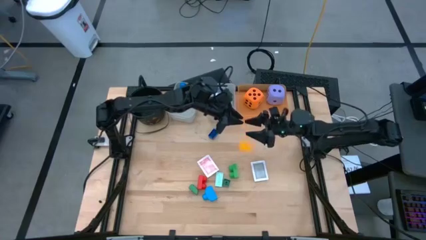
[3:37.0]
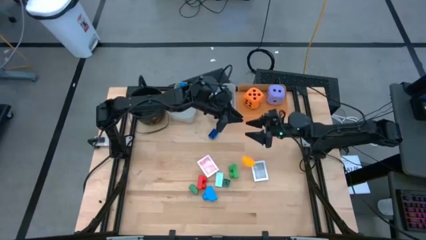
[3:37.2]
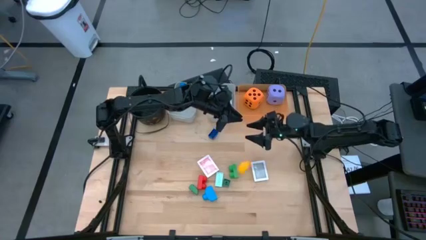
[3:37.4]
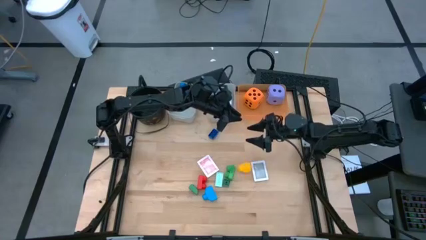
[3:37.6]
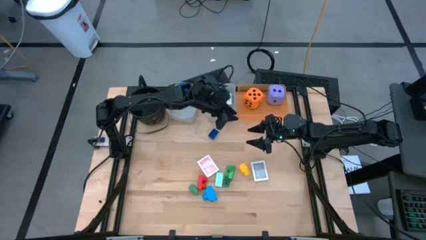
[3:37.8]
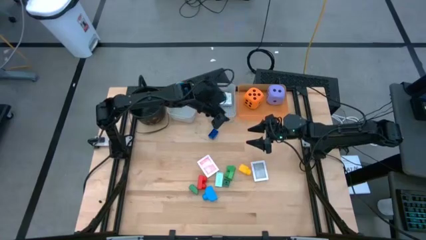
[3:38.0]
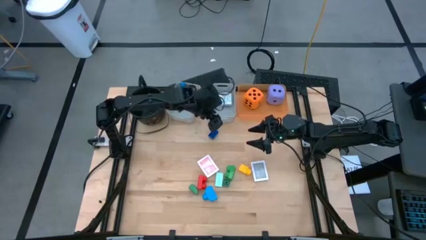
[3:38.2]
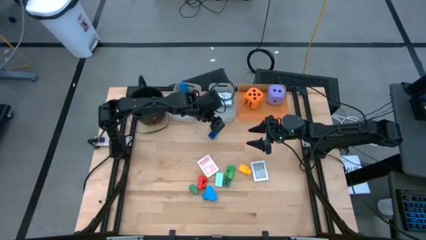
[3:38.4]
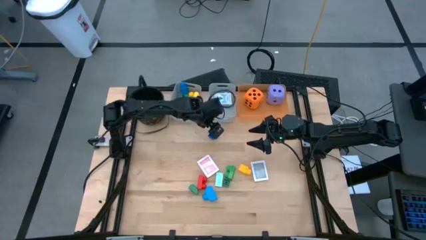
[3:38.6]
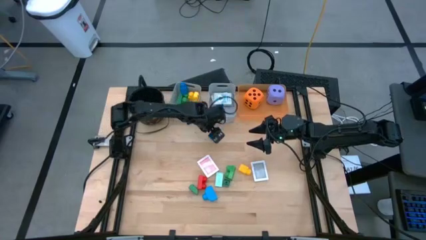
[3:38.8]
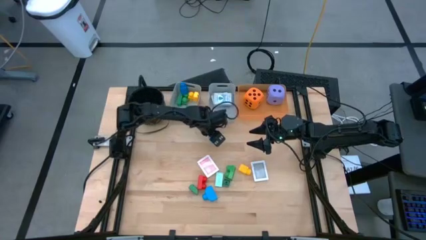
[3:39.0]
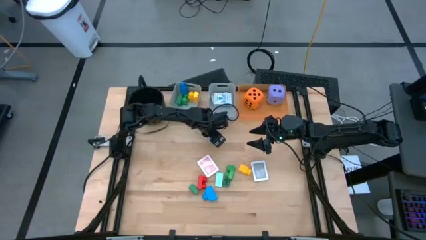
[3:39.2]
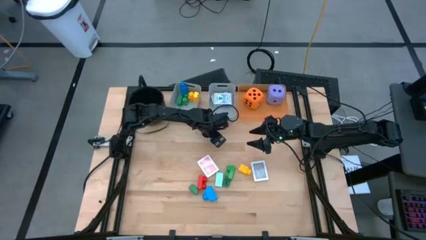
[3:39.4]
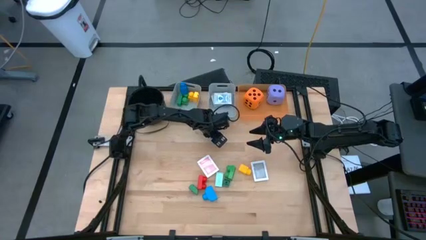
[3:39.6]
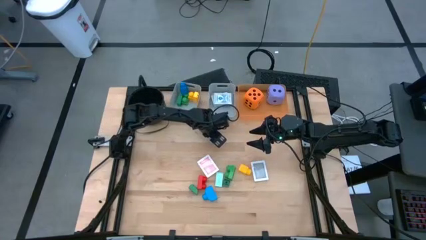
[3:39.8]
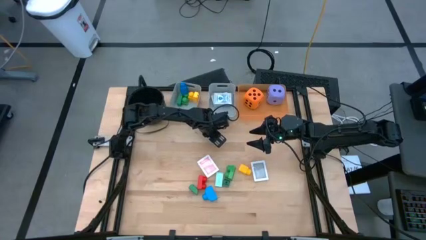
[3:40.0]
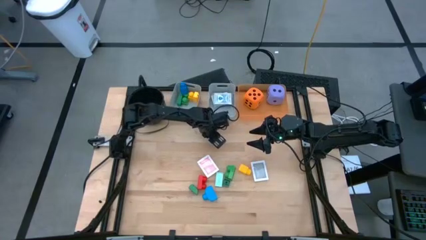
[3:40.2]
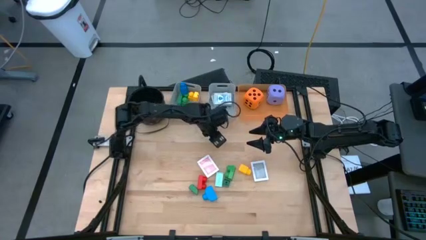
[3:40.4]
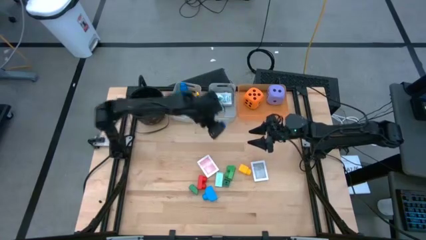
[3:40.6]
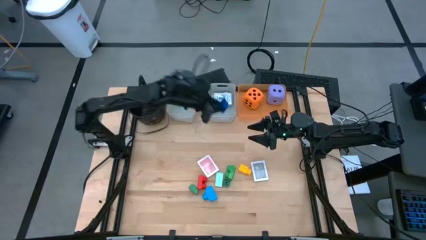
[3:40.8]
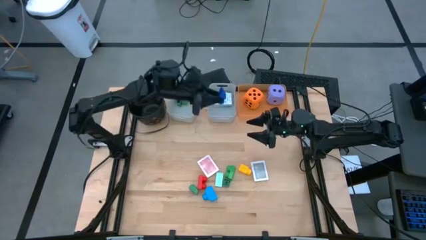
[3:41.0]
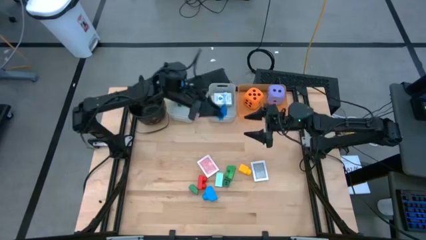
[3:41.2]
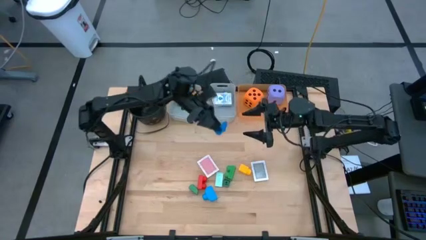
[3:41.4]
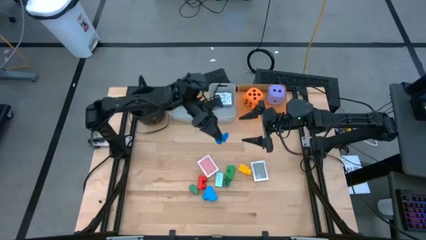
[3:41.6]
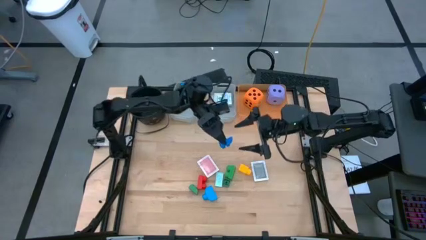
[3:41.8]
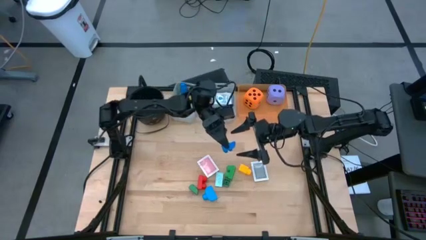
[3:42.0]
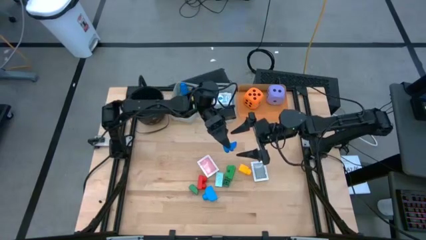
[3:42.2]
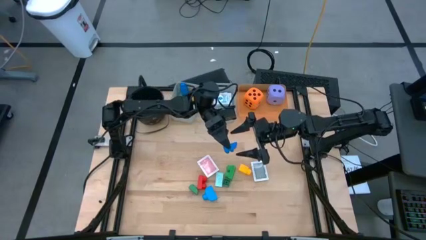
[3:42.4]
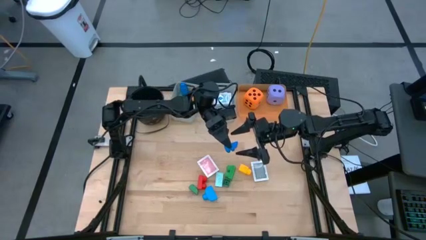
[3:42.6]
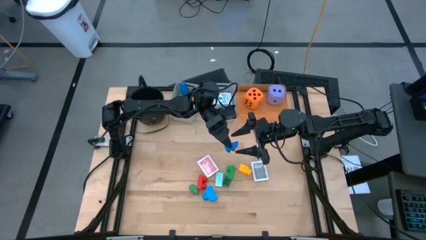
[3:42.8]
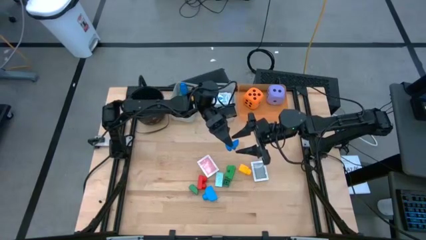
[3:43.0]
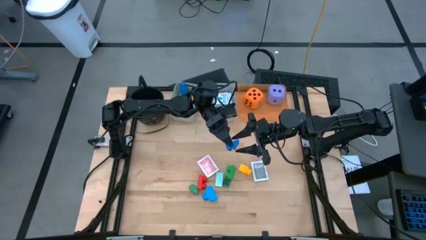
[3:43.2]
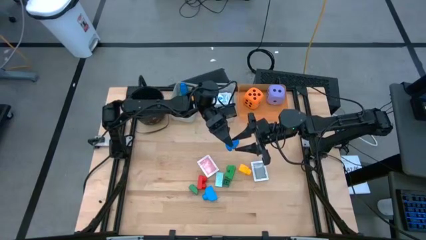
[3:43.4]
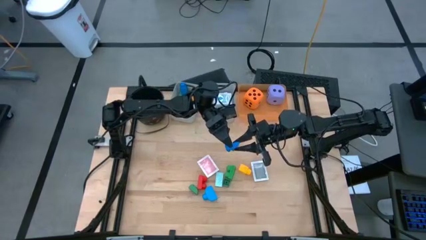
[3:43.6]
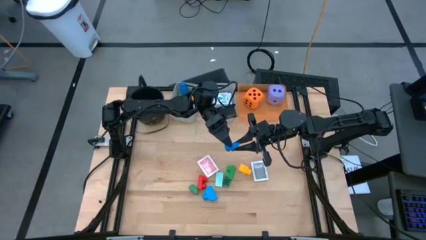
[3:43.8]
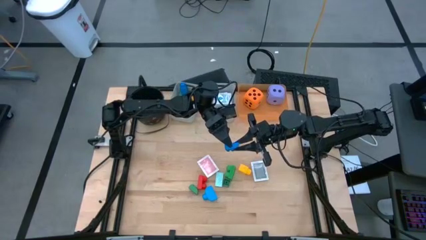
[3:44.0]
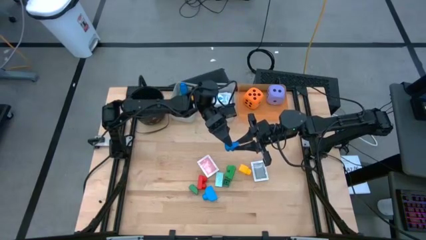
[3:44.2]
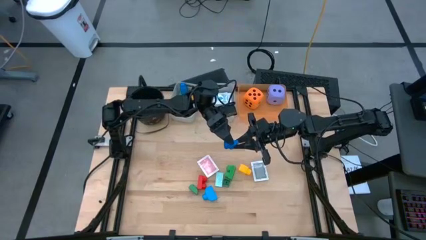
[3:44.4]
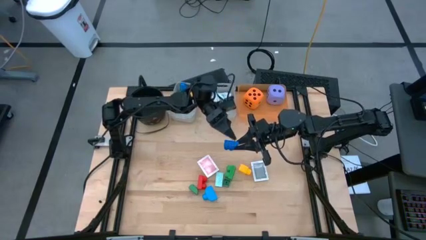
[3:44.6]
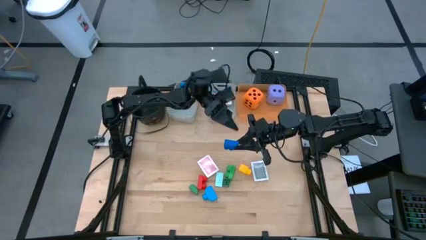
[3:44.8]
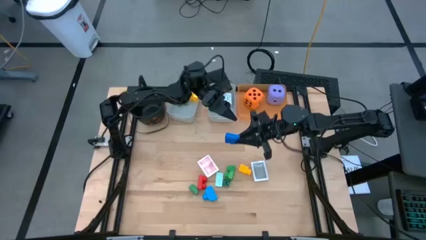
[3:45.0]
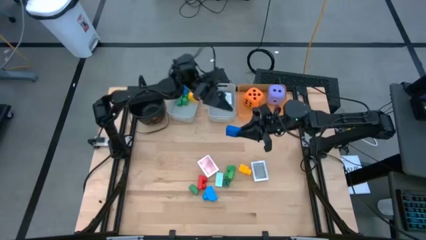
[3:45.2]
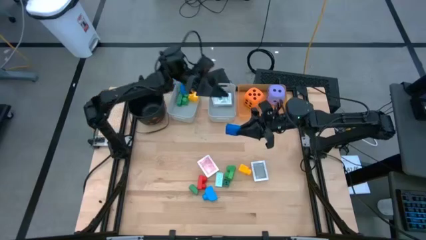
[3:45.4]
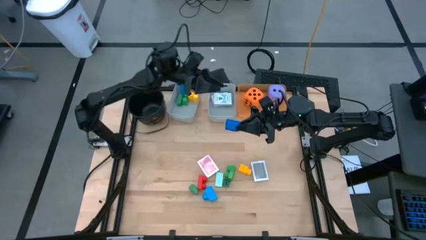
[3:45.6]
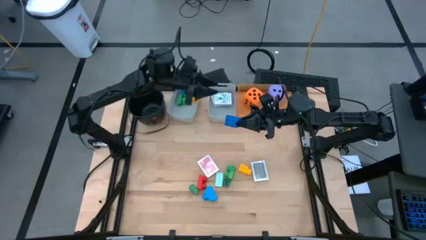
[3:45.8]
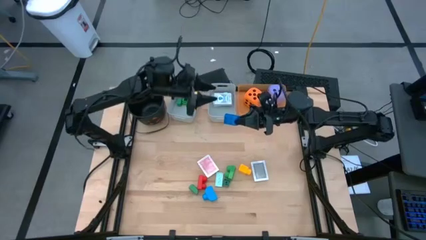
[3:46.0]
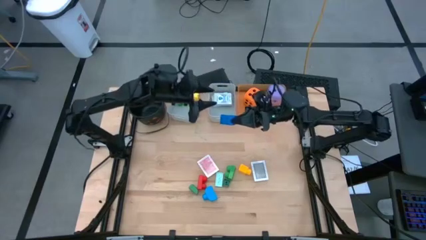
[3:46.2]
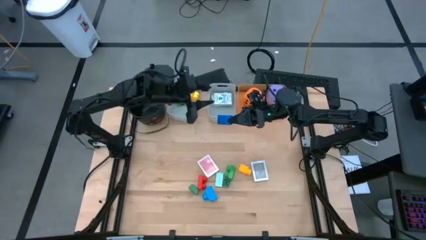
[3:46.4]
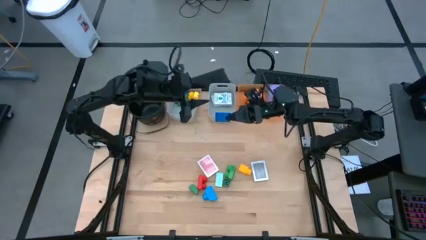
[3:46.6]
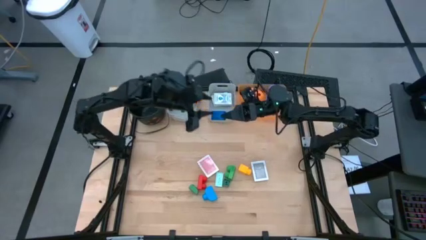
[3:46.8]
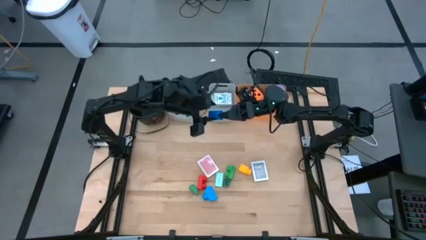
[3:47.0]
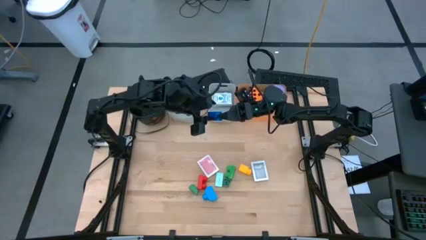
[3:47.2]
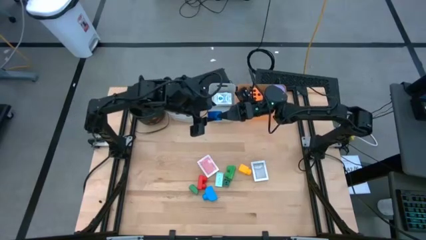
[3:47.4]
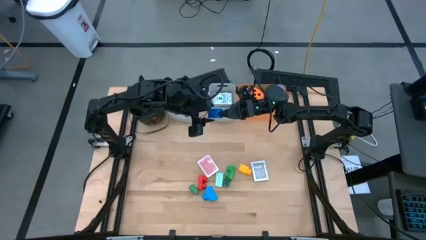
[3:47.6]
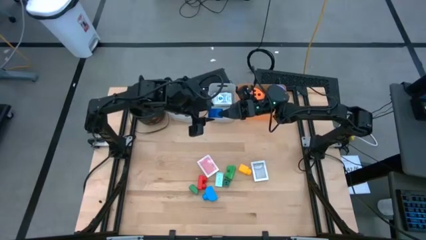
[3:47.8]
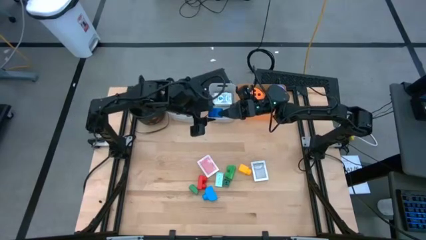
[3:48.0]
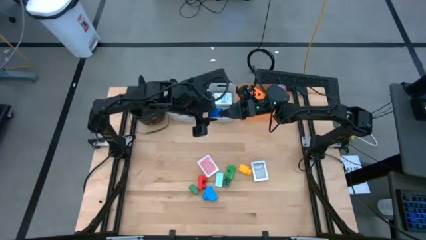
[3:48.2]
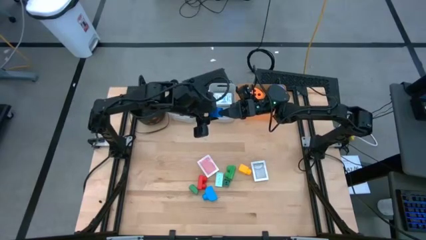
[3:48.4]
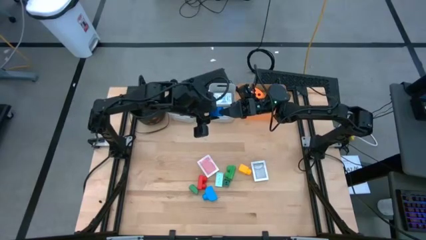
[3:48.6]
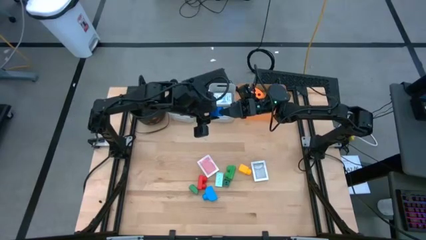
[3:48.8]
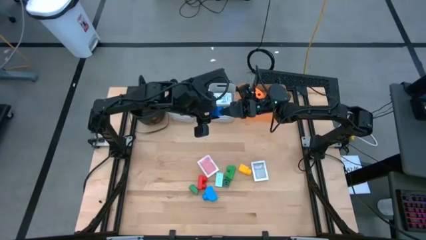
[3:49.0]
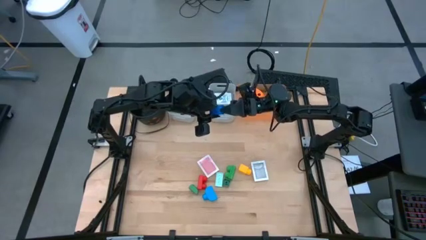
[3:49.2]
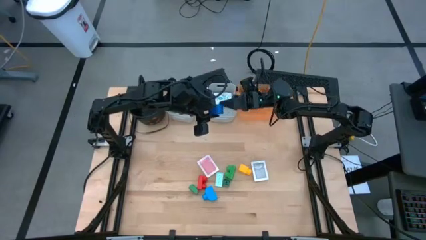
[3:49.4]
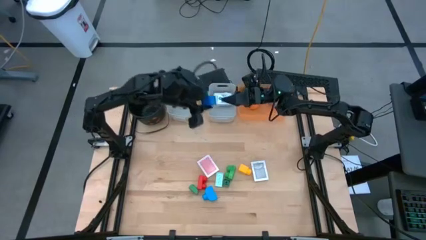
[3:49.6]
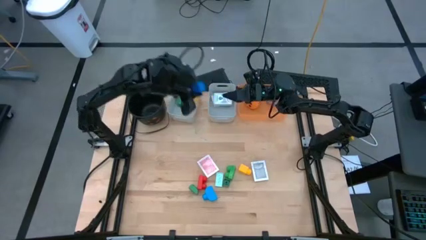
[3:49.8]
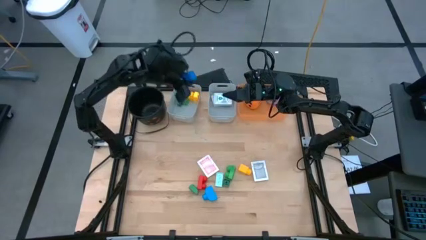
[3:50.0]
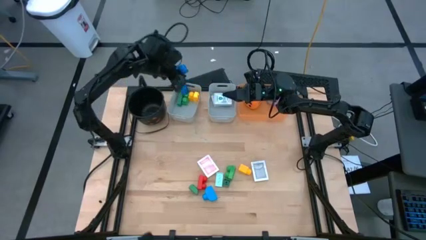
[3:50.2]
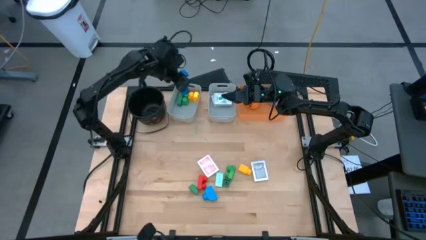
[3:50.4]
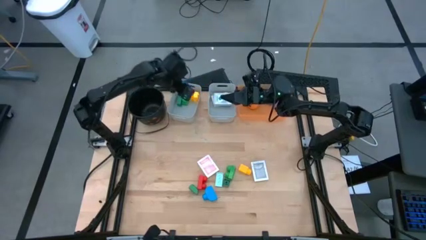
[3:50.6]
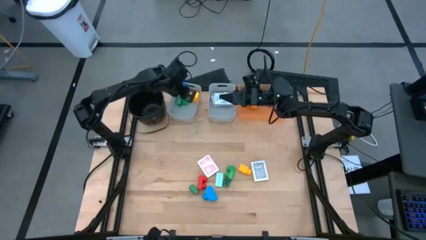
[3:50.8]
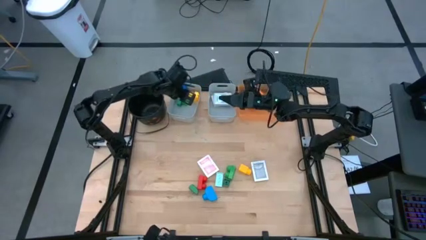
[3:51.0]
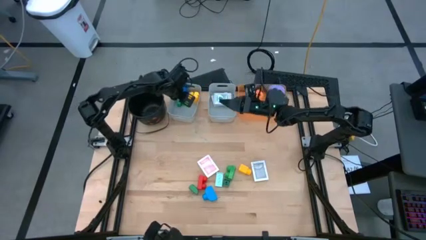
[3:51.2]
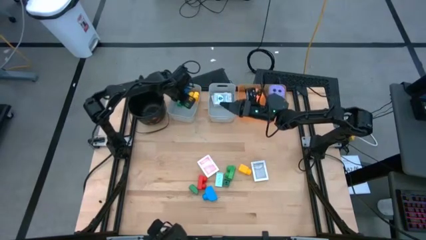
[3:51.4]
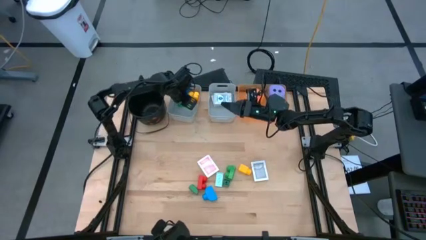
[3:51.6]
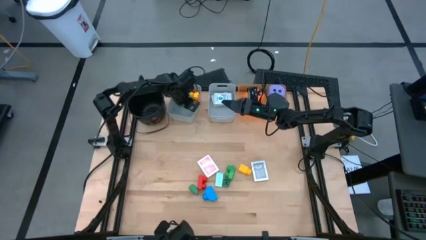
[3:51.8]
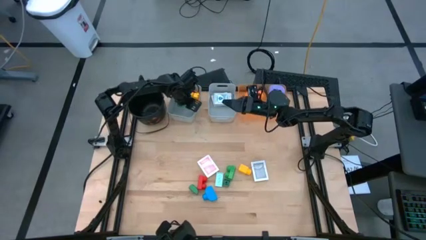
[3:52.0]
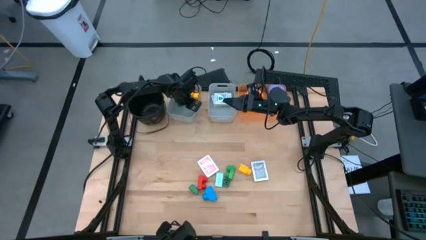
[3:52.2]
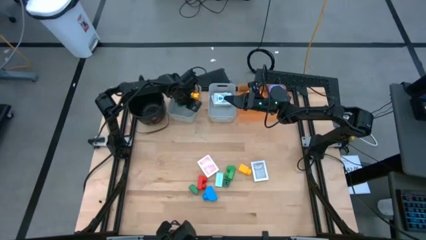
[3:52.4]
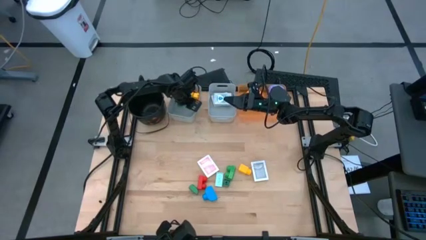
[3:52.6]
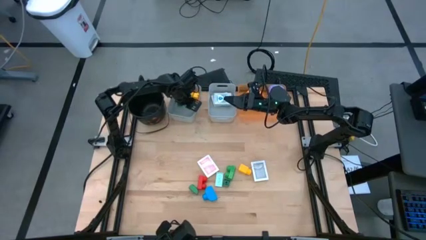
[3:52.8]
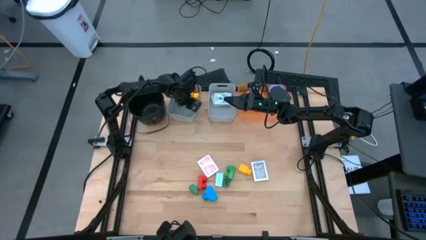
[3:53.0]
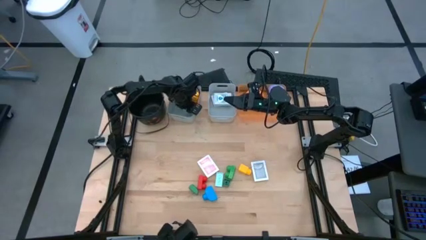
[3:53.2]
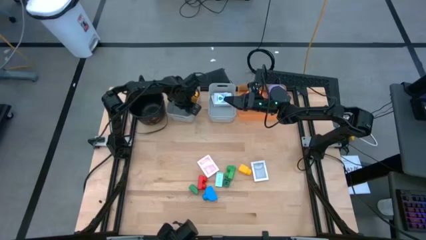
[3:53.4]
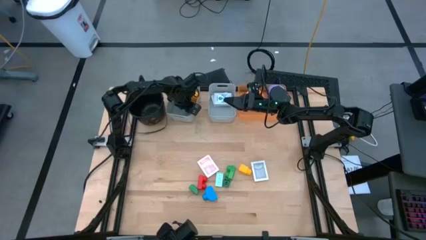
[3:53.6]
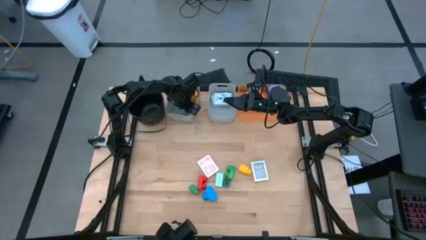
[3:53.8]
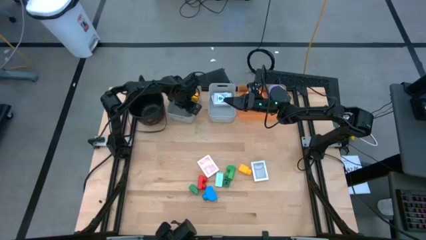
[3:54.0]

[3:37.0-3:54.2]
Task: Pick & Place Toys
Put the blue game piece into the left gray bin
